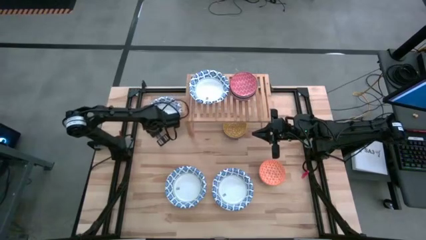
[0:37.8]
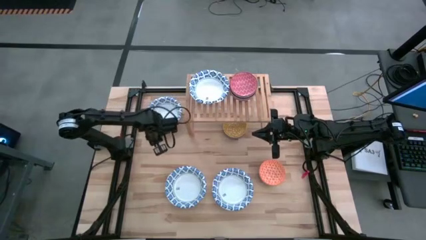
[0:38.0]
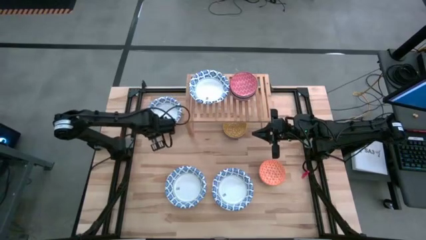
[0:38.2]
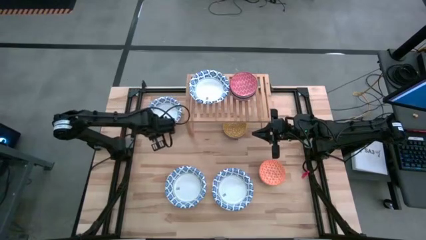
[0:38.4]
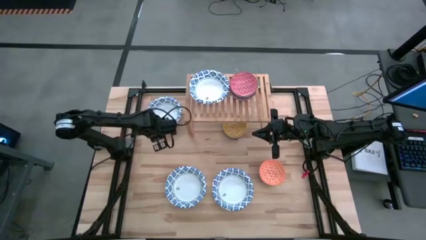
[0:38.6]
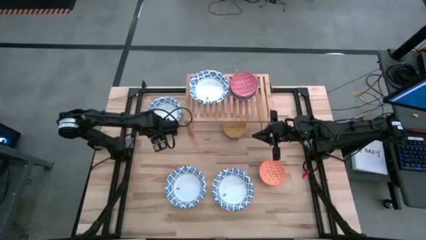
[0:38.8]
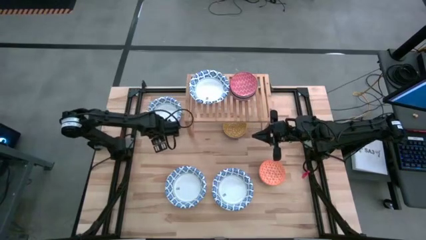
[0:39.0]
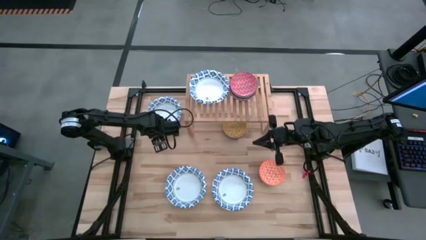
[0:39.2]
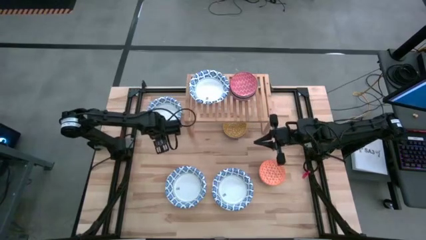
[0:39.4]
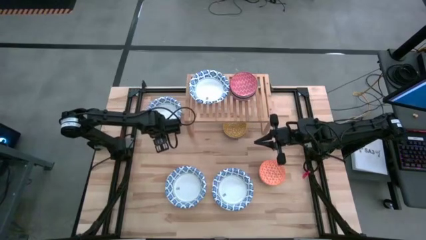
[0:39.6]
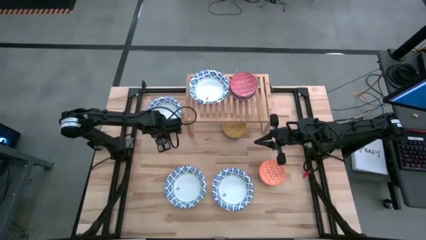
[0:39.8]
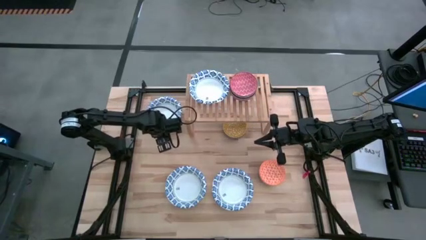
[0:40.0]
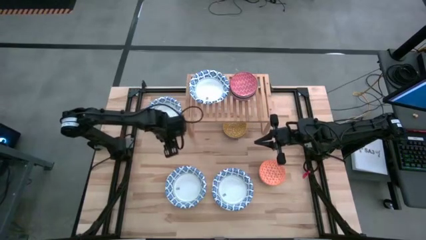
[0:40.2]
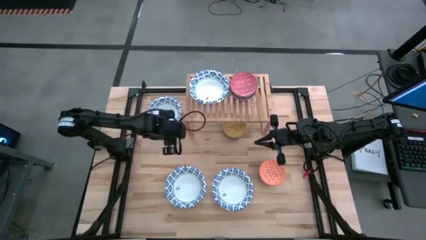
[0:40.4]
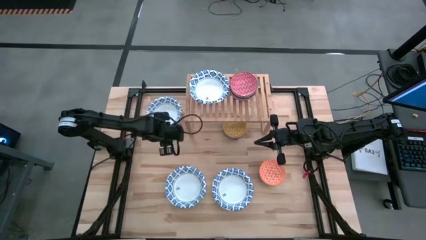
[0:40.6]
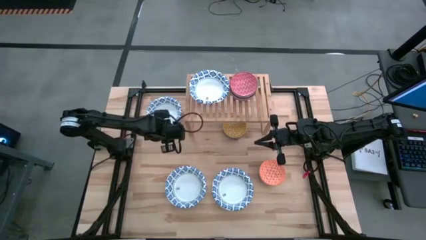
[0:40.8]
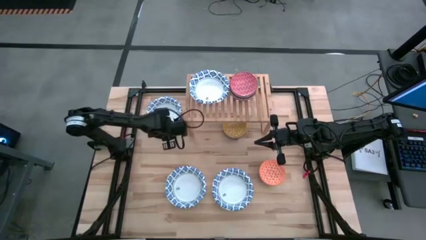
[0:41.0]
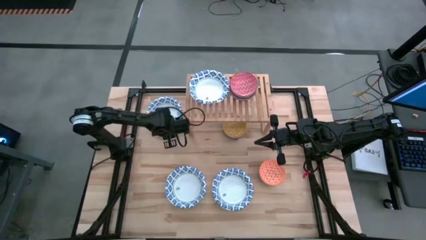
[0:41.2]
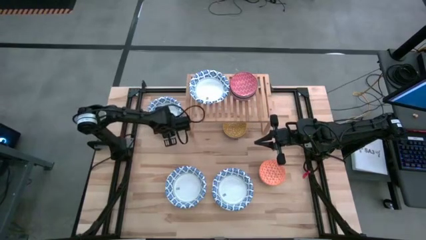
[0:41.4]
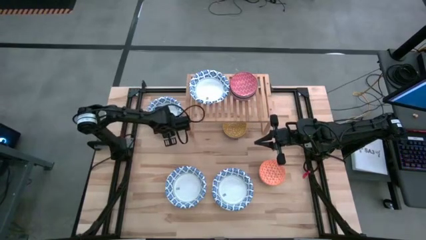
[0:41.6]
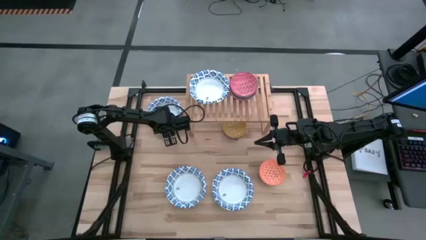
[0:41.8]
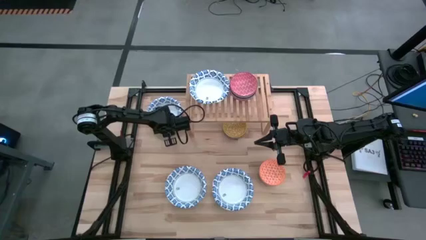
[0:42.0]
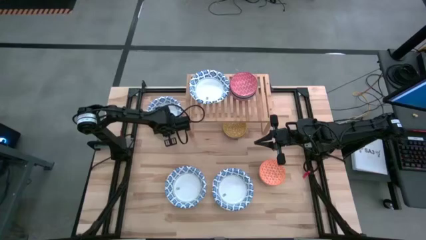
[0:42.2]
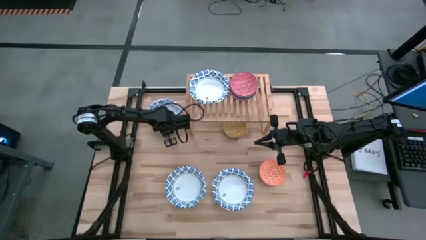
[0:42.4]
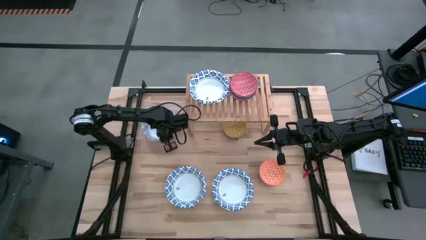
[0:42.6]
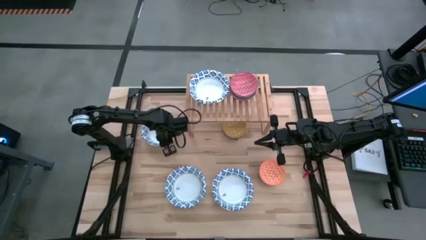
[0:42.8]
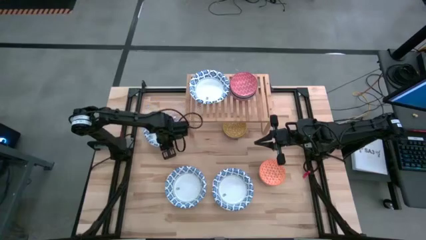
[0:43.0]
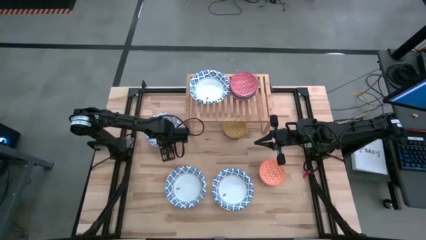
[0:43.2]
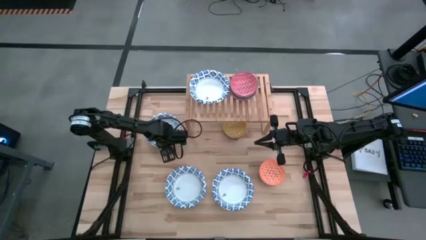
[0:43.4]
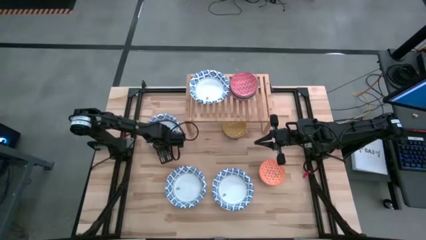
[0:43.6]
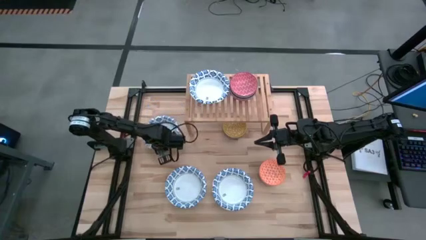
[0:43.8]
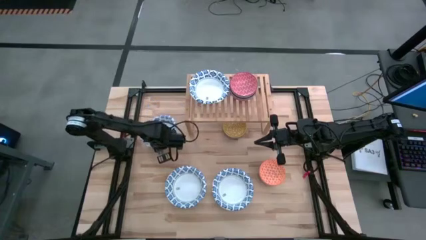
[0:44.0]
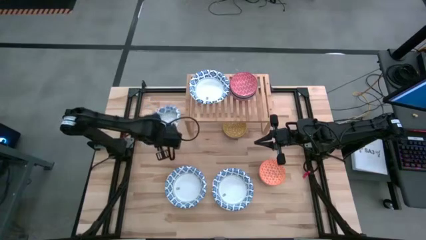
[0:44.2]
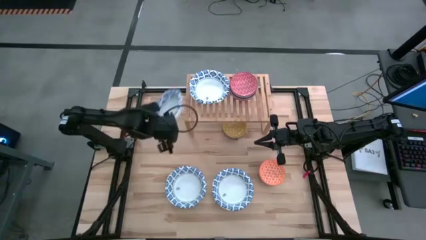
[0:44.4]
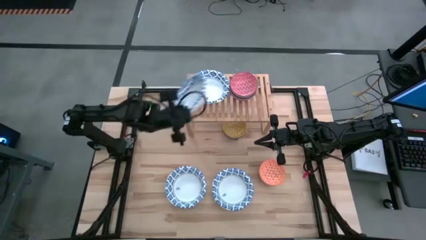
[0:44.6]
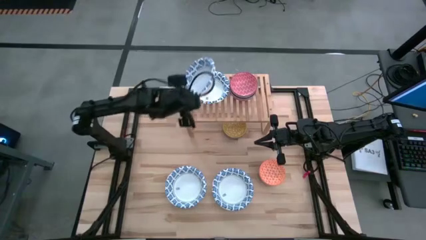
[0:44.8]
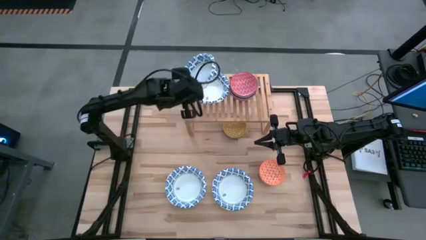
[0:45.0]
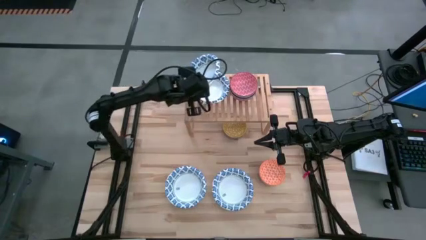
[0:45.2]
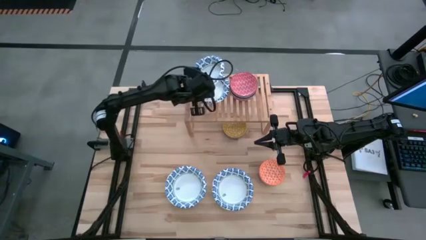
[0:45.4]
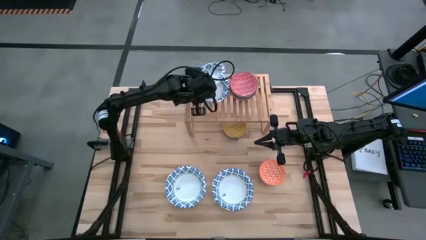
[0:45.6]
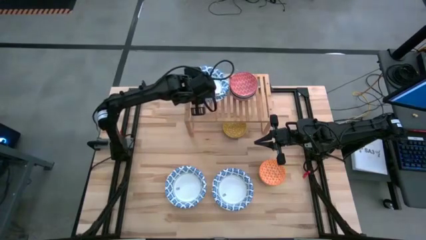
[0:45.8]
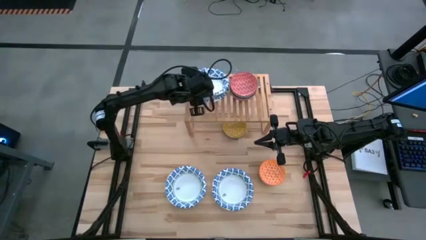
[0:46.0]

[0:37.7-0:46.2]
Task: Place and stack bowls onto a shelf
Stack the top left white bowl on top of the white bowl on the shelf

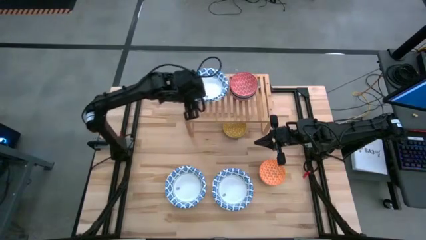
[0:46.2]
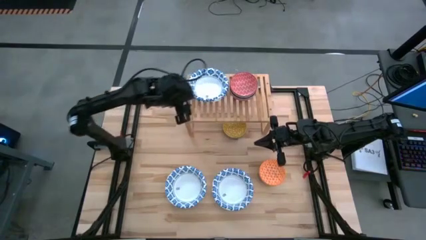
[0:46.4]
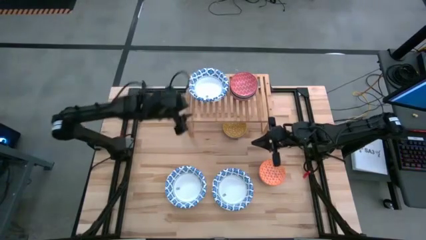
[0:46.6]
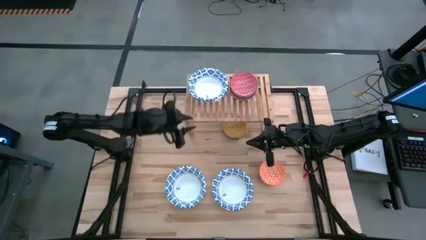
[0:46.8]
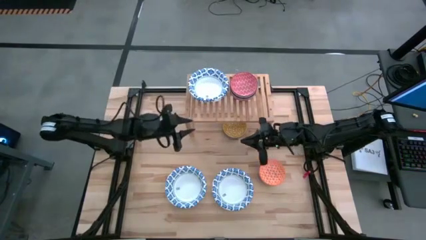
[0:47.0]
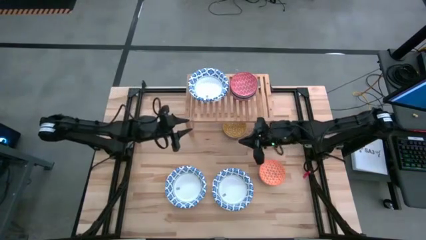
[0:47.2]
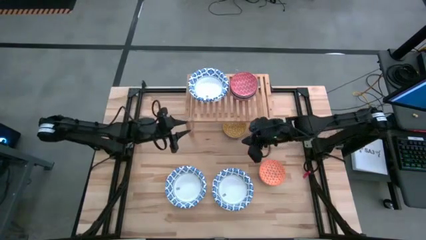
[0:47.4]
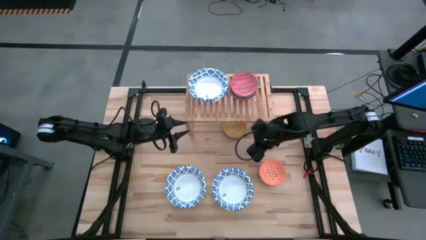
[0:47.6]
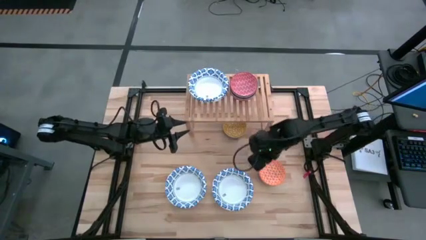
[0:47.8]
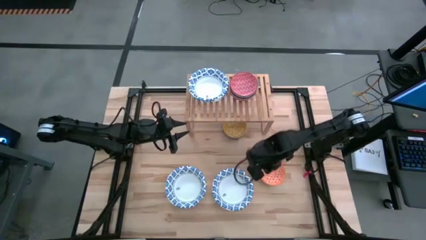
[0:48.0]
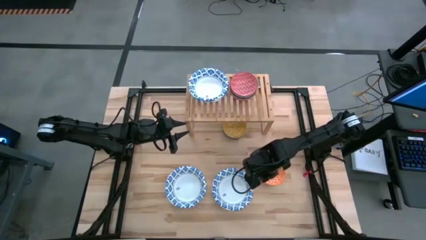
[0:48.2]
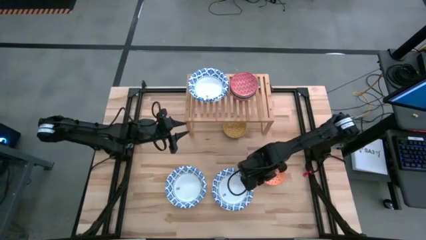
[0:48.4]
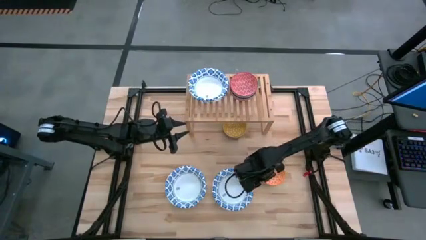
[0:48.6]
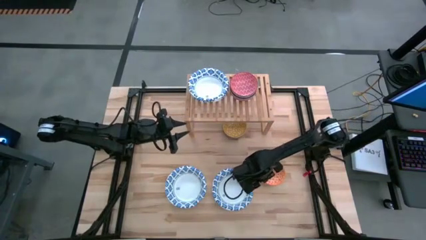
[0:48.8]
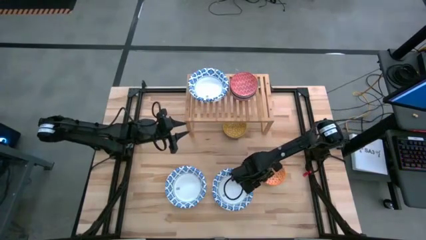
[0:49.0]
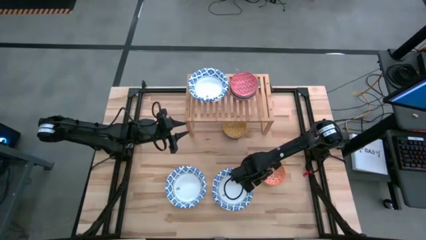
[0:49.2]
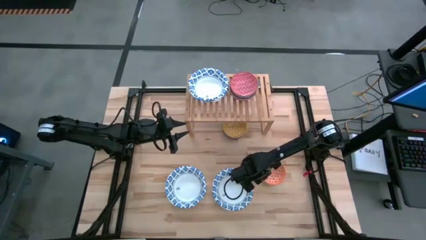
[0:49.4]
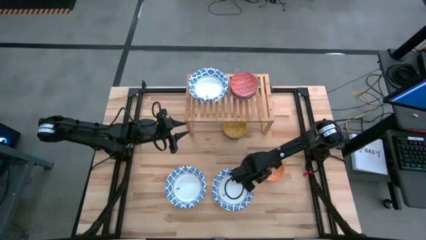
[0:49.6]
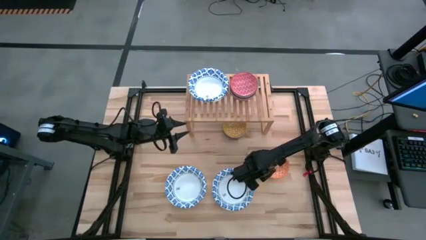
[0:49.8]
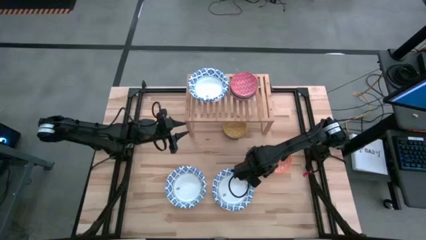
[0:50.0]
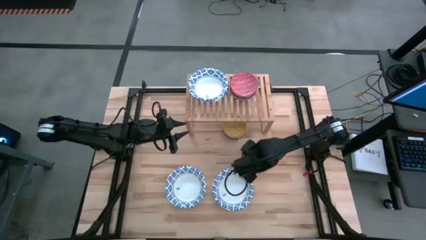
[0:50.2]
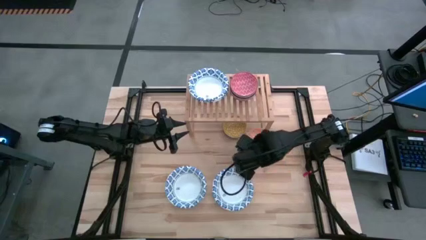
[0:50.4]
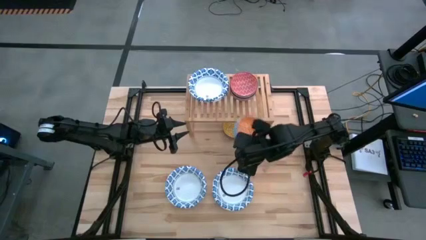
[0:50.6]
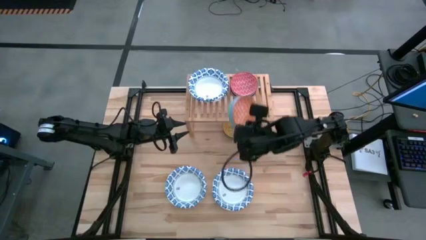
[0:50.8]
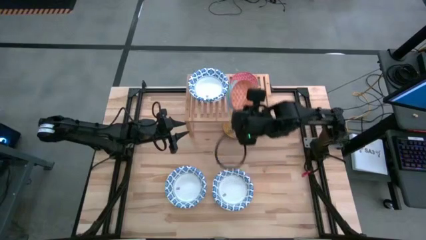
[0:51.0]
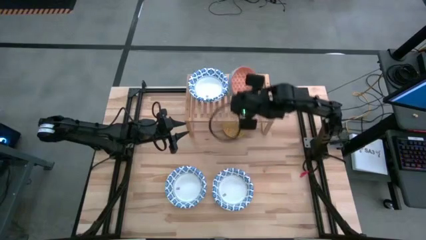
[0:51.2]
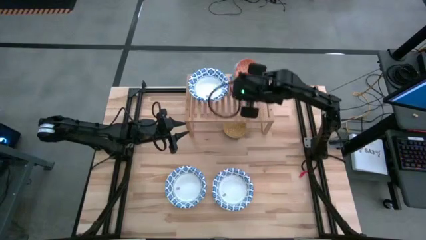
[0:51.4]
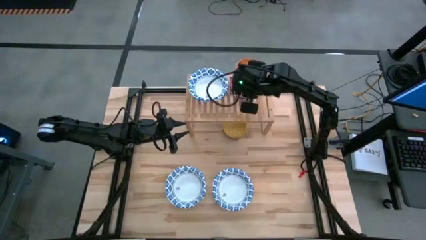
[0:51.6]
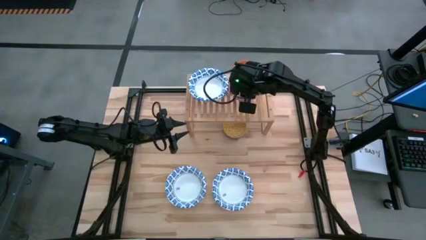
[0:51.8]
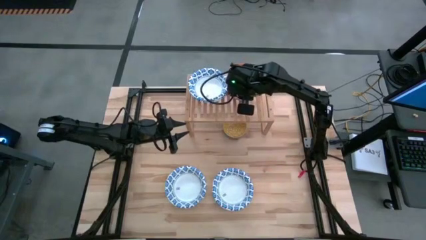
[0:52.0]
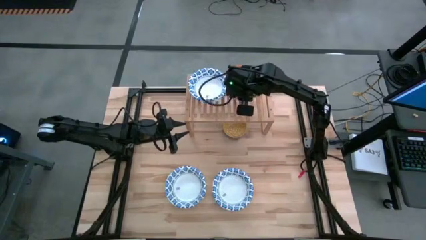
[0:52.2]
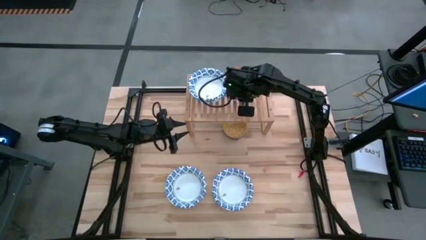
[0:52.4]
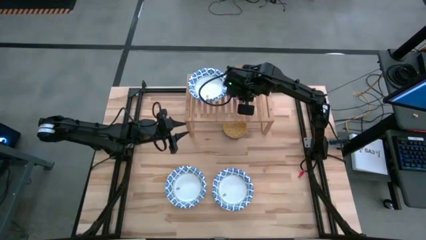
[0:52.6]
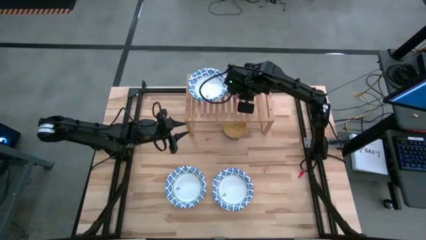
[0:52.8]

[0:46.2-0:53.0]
Stack the orange bowl on top of the red bowl on the shelf
